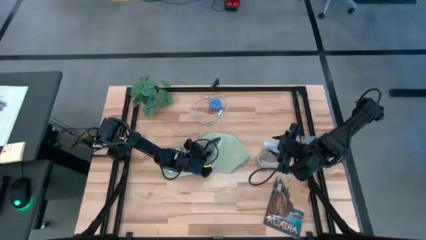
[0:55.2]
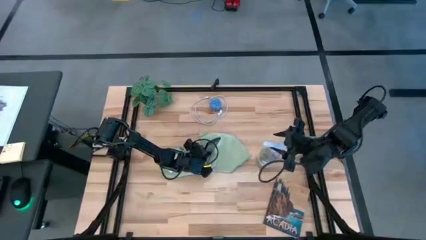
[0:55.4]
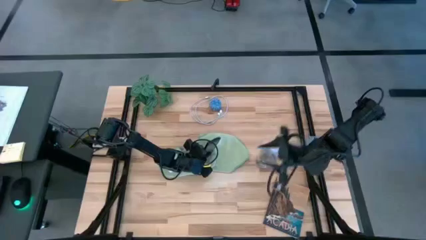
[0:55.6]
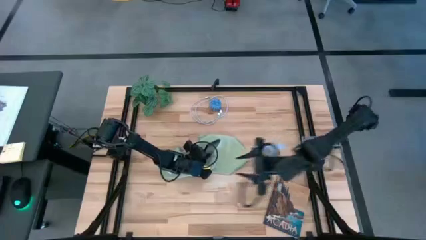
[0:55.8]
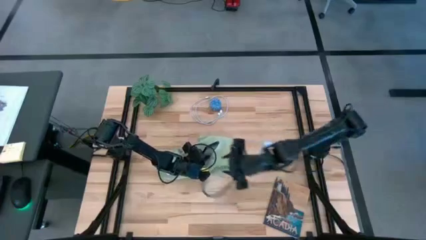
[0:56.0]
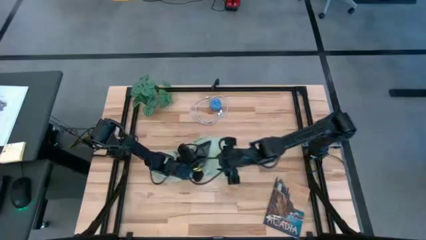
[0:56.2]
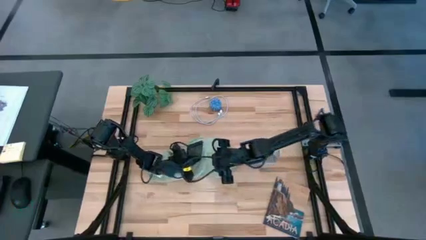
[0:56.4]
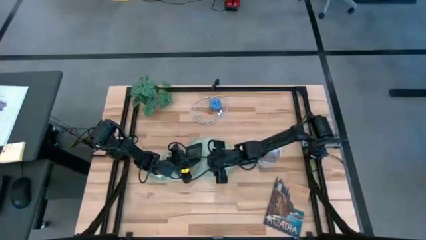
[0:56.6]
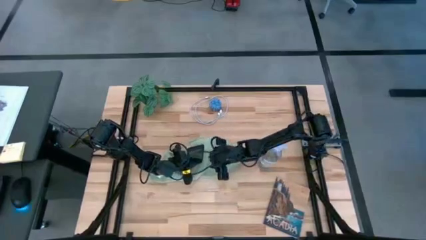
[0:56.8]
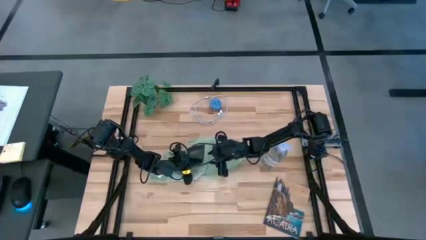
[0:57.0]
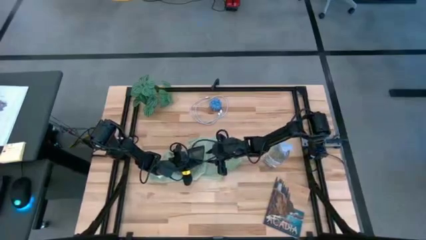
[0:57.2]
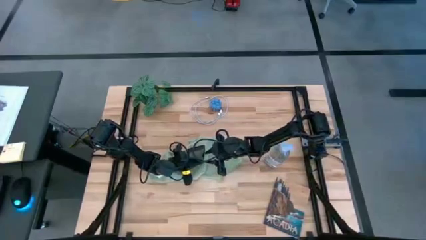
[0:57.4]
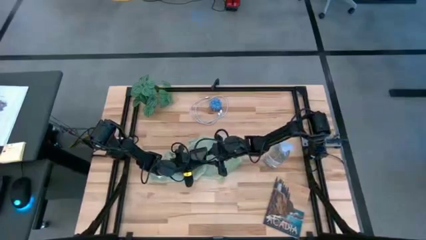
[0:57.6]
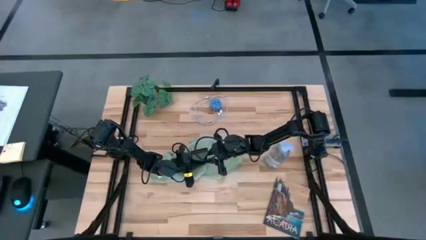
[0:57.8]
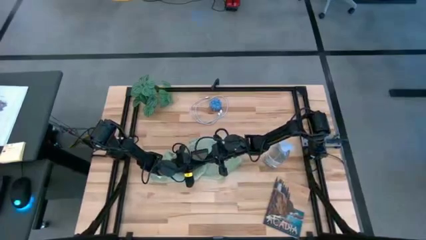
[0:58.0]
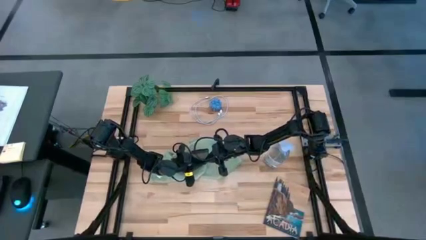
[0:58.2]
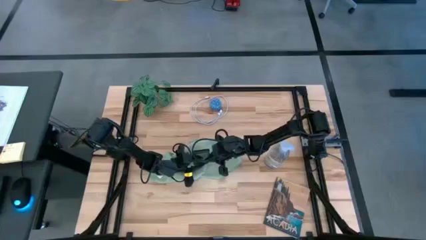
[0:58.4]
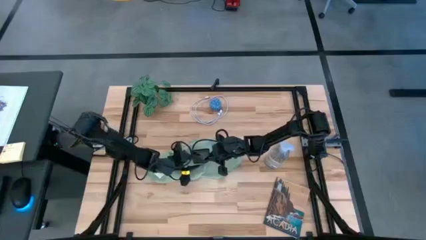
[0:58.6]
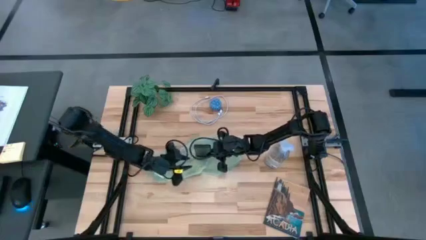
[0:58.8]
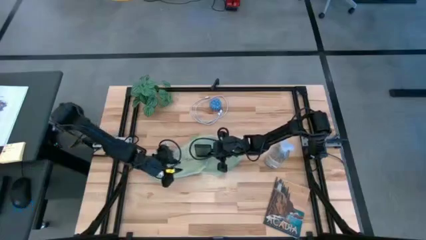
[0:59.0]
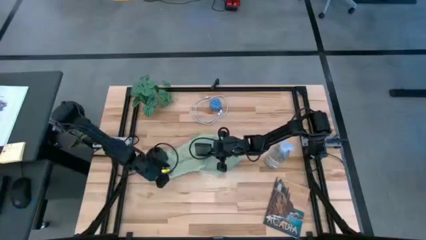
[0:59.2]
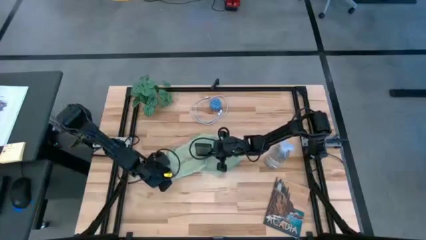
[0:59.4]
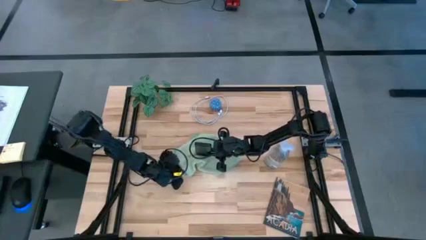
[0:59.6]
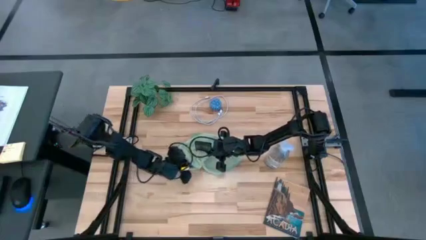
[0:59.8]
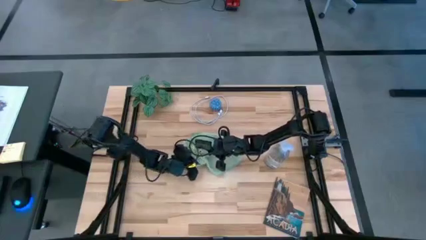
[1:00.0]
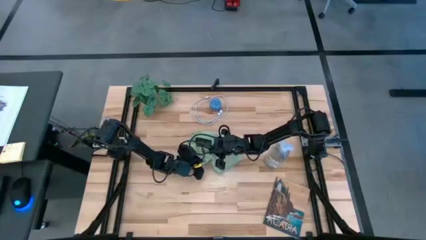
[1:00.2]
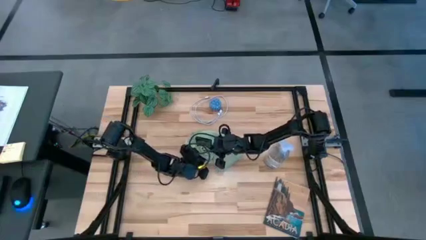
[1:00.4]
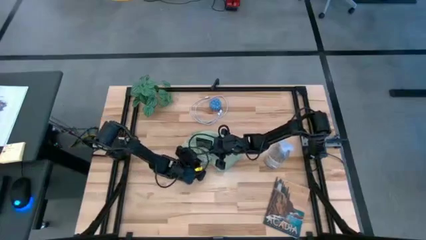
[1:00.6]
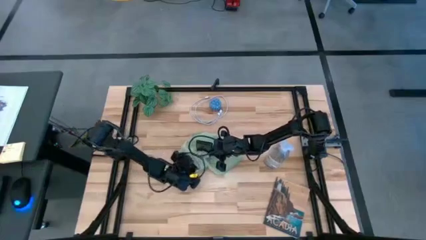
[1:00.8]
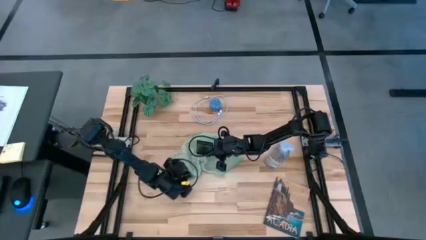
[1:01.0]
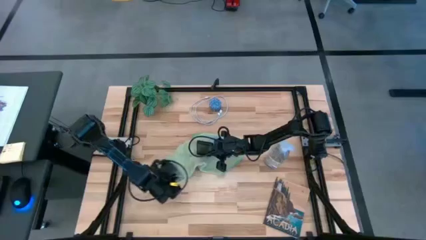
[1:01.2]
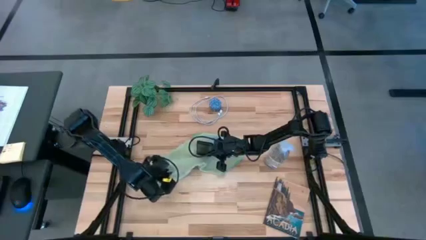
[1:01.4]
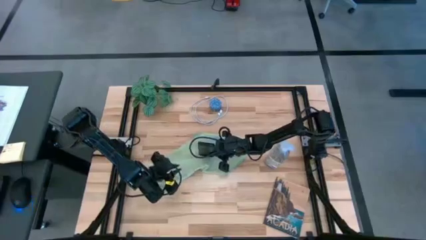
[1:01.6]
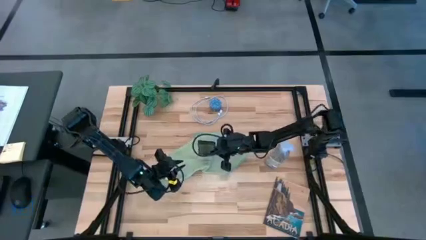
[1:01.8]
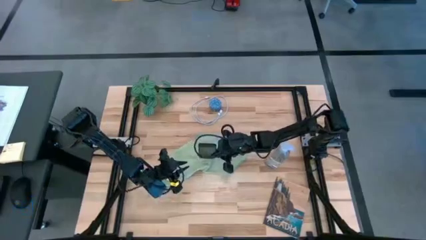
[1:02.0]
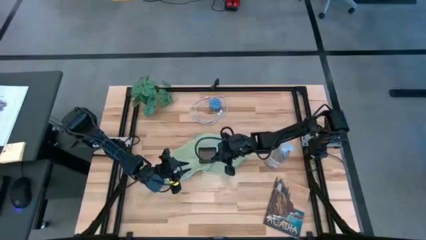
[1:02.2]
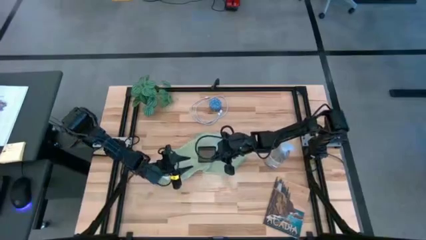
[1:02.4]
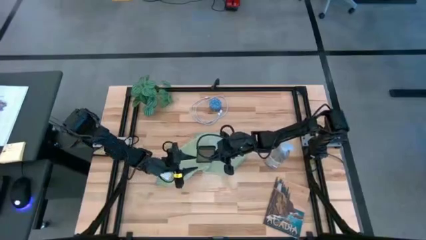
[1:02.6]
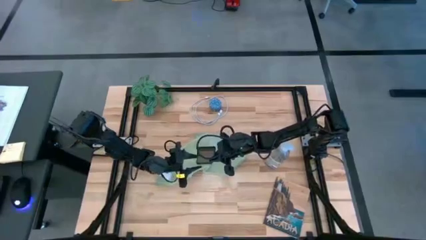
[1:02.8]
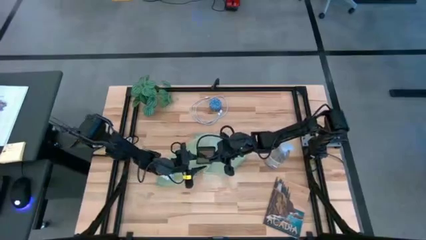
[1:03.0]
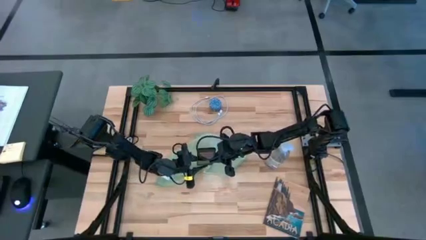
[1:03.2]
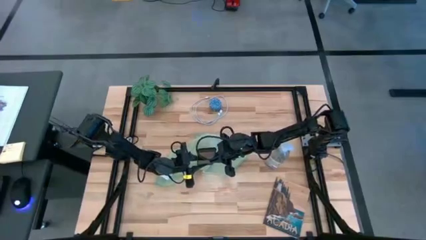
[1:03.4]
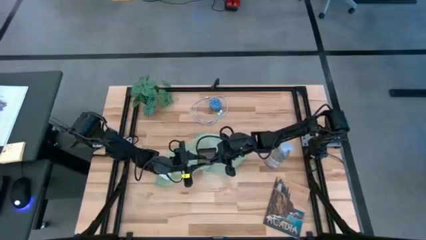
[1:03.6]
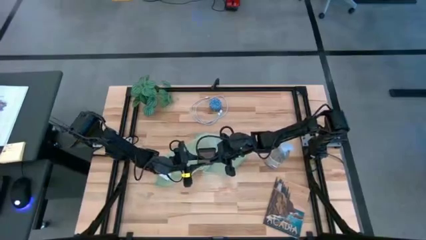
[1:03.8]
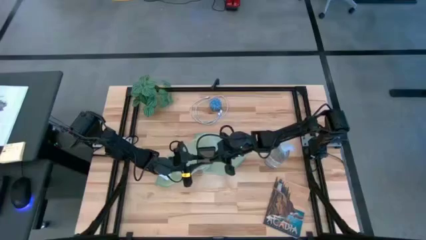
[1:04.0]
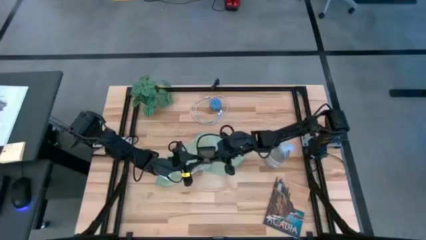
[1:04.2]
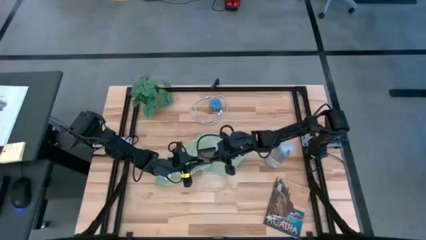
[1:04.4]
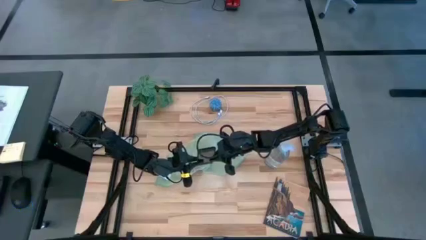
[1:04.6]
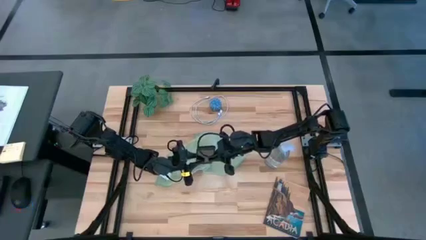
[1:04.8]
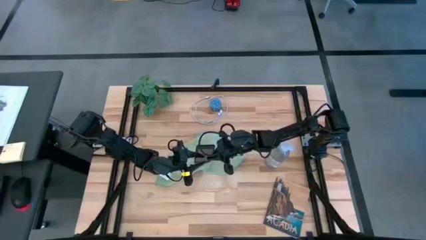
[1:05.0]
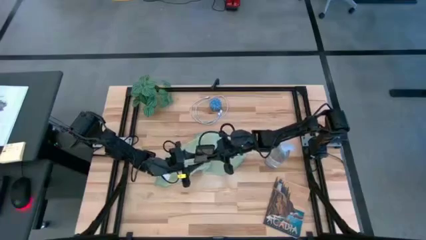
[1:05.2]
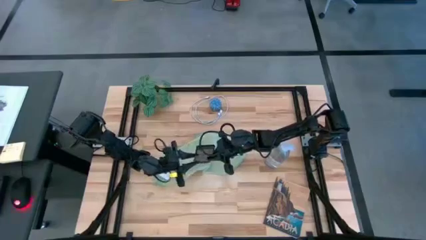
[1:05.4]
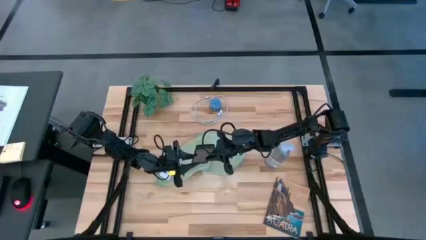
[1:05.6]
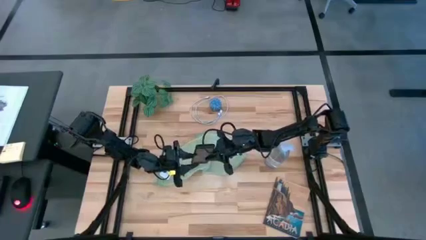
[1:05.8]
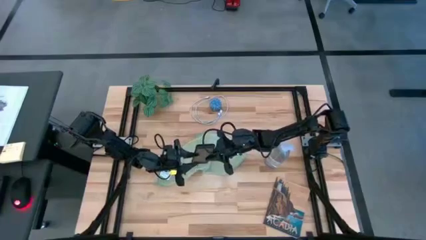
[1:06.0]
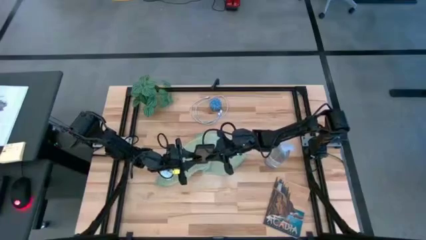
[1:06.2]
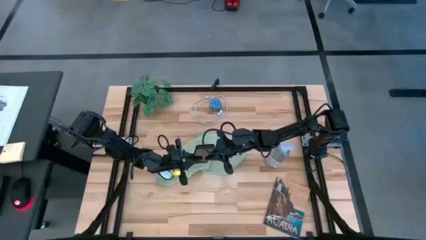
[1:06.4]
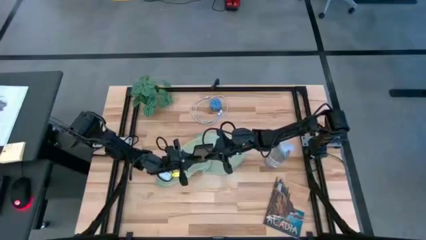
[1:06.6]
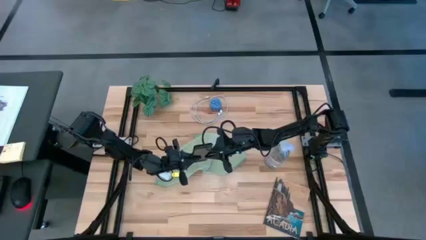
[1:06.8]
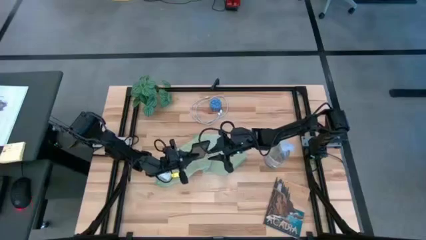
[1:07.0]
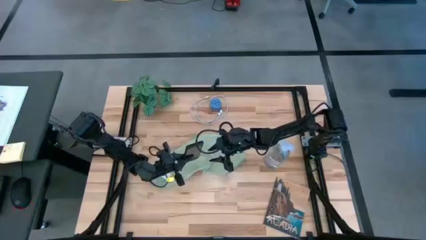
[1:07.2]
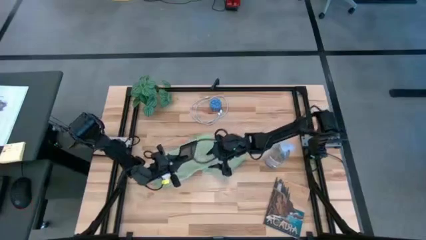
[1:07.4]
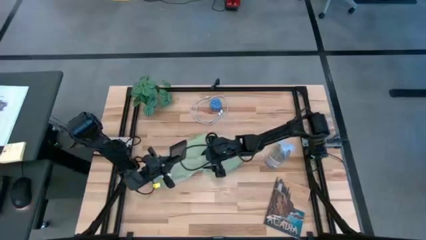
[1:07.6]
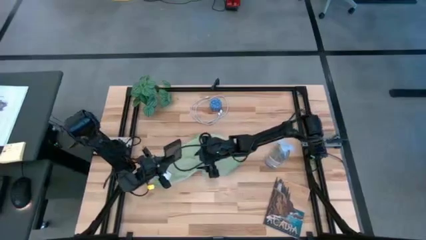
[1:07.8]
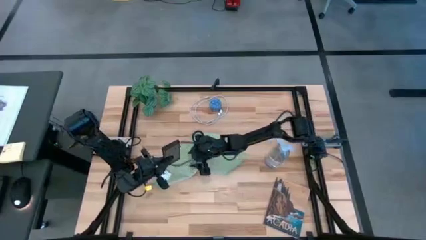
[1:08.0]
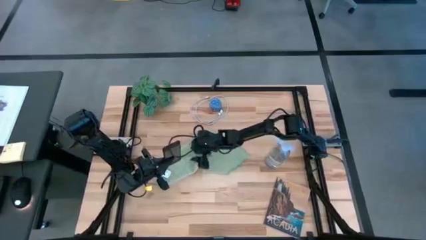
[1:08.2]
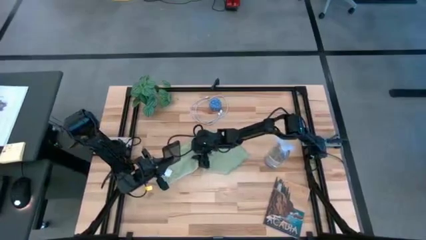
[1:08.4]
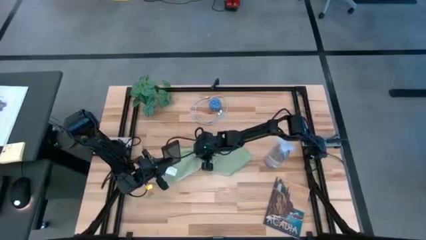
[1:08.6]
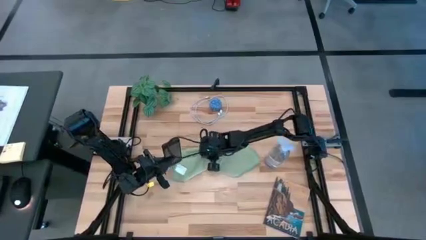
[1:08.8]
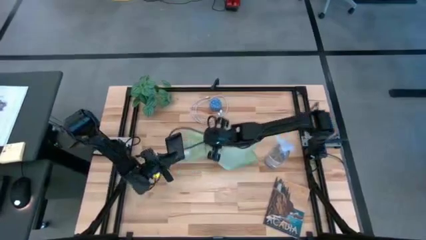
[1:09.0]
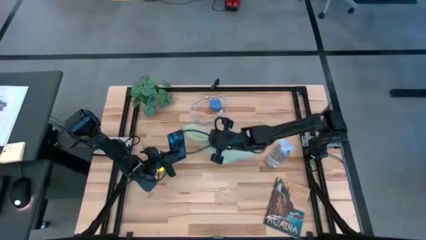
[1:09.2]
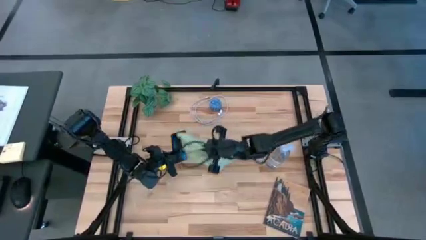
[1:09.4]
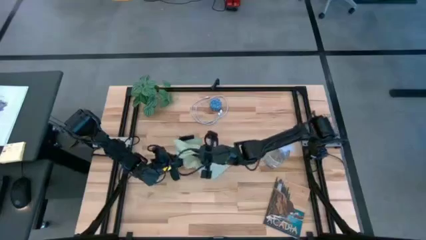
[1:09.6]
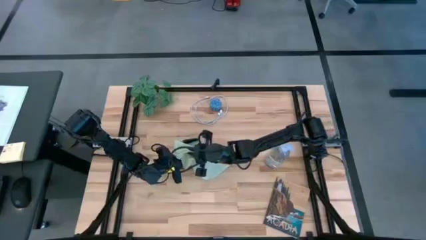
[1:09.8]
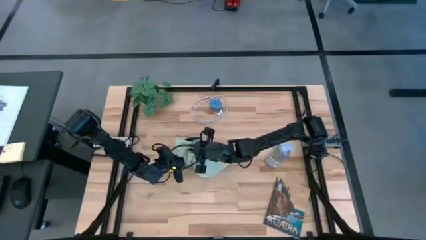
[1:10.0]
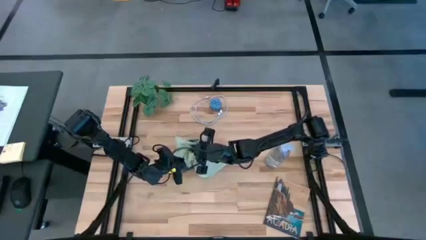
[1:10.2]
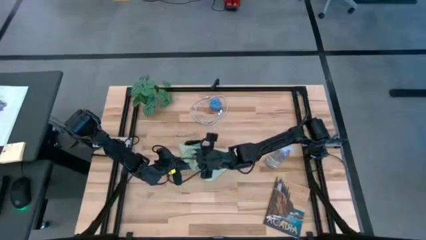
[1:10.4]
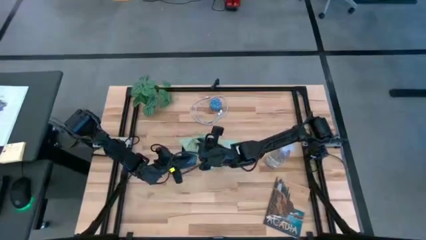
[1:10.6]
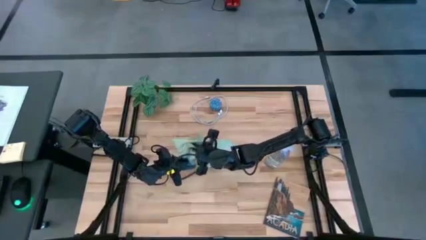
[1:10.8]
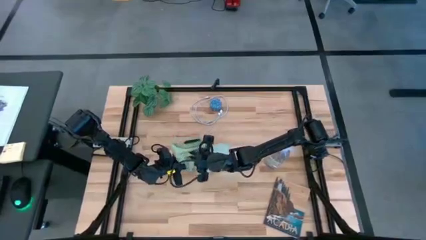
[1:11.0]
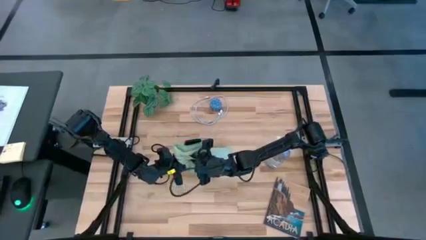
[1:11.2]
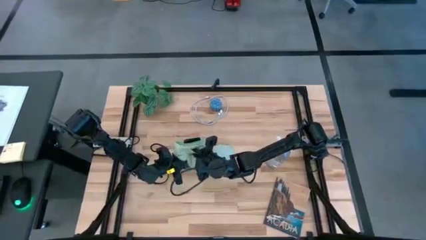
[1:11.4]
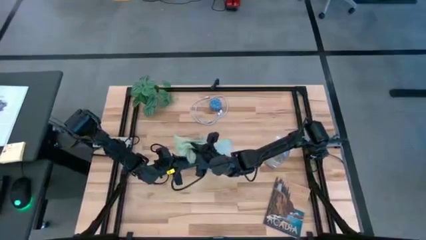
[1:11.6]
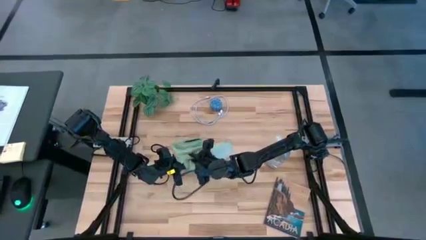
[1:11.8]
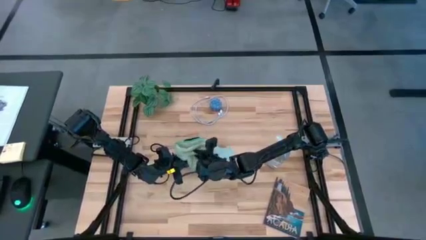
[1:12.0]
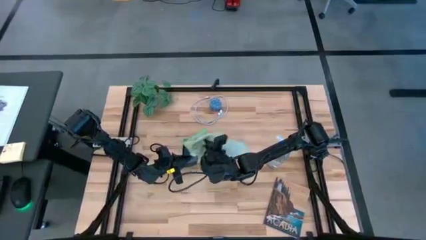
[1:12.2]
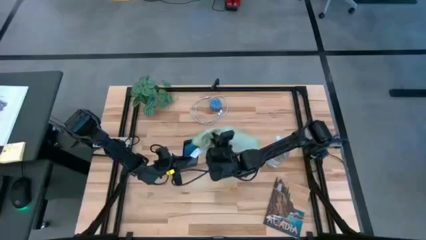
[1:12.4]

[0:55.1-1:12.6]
Task: Apply microfiber cloth
Wipe the front of the phone with the light green microfiber cloth
